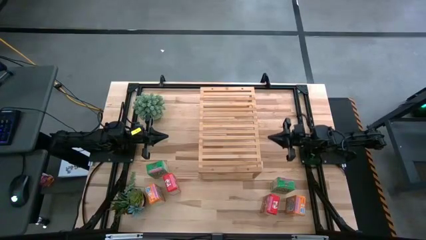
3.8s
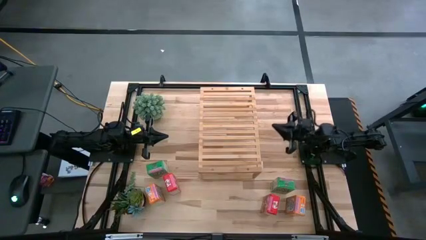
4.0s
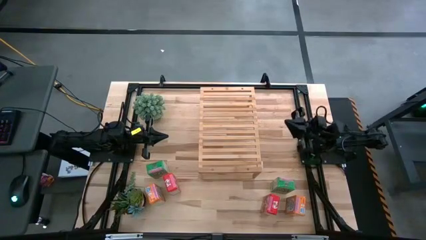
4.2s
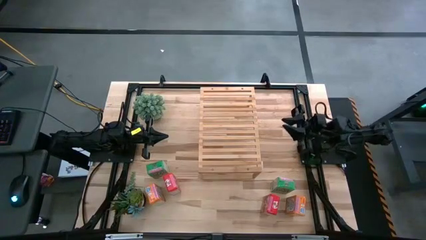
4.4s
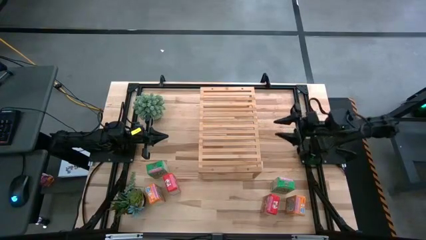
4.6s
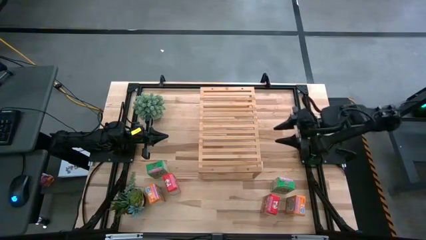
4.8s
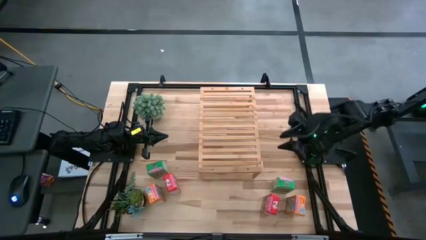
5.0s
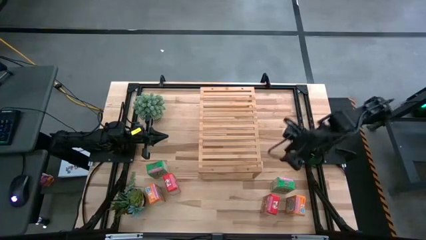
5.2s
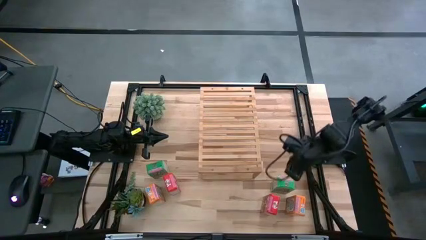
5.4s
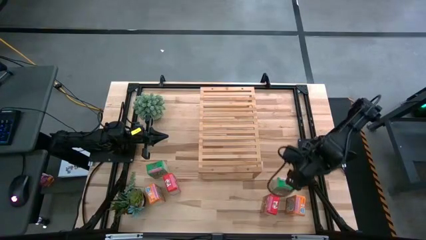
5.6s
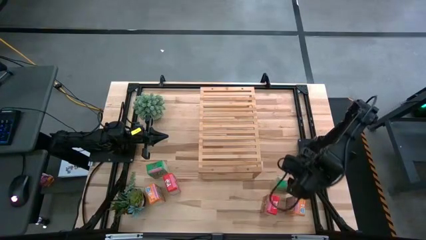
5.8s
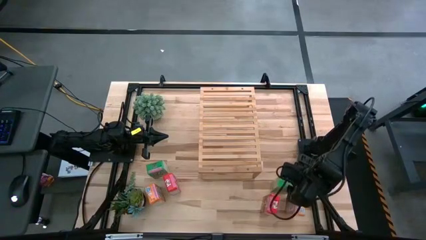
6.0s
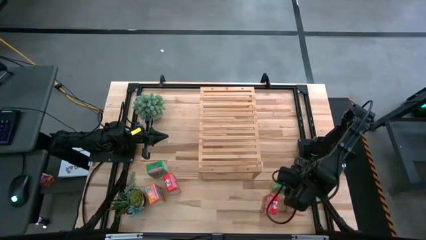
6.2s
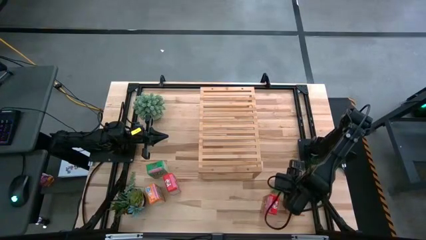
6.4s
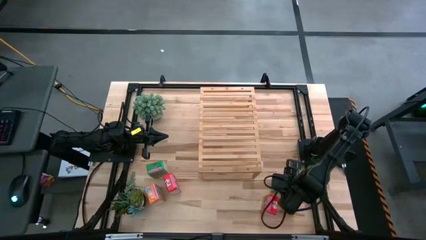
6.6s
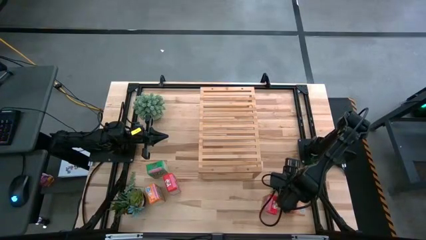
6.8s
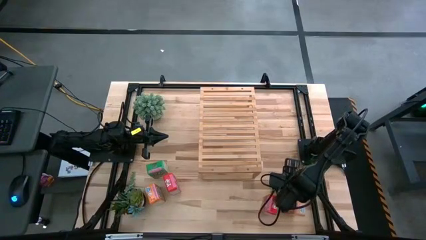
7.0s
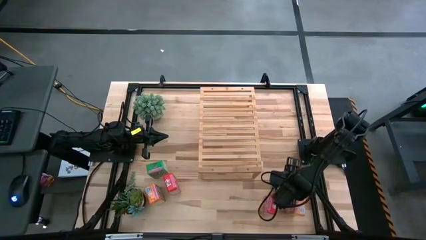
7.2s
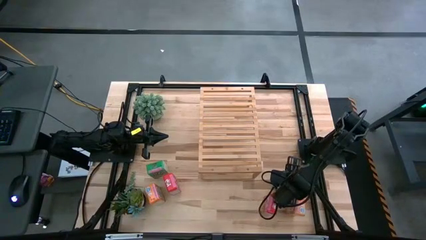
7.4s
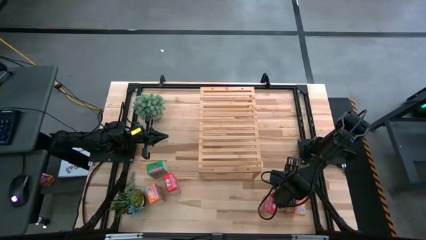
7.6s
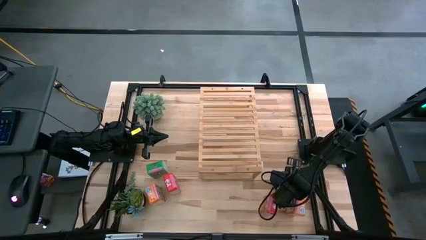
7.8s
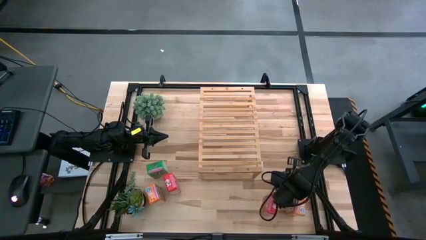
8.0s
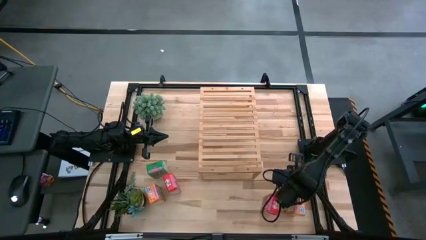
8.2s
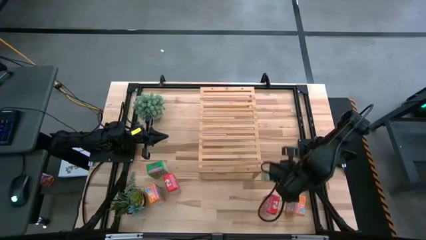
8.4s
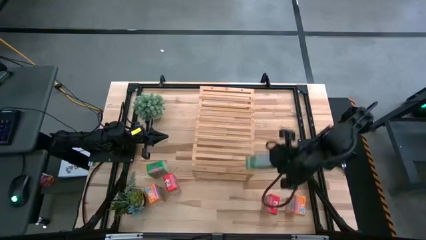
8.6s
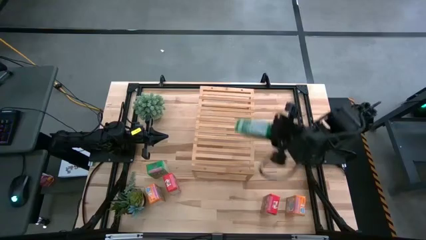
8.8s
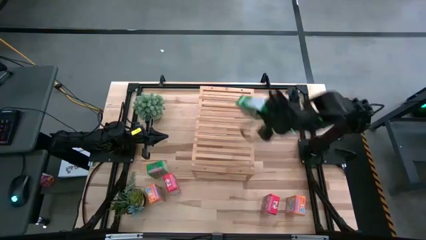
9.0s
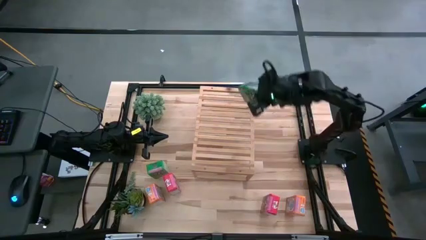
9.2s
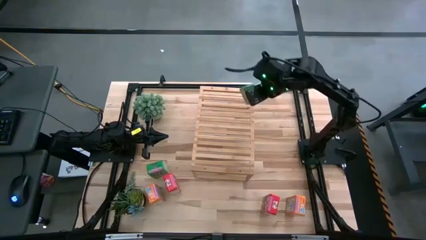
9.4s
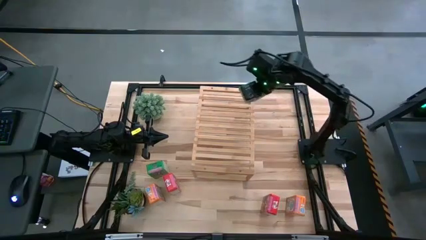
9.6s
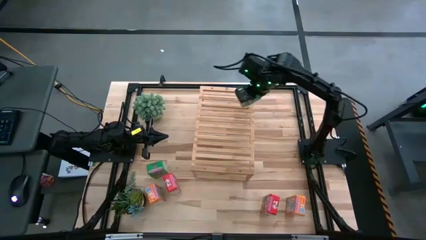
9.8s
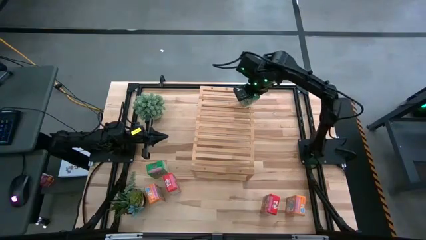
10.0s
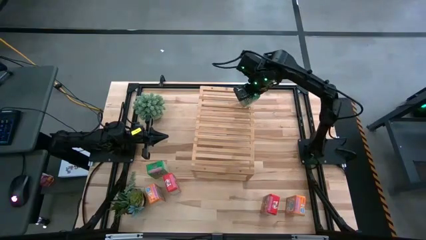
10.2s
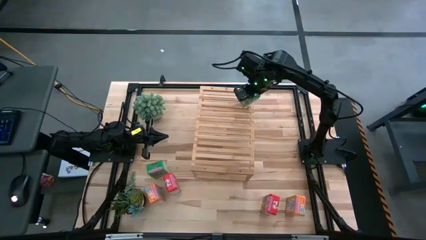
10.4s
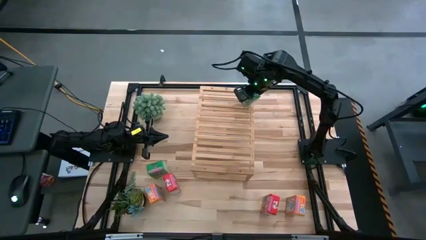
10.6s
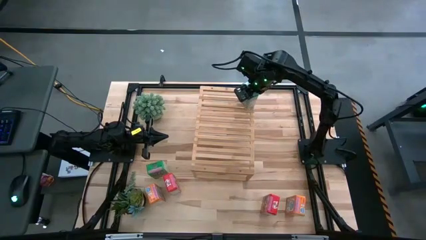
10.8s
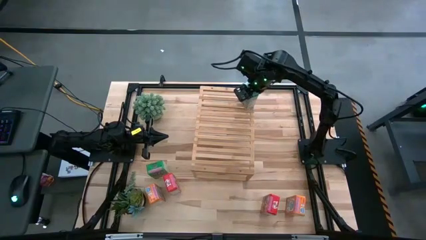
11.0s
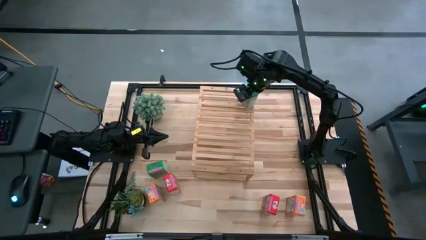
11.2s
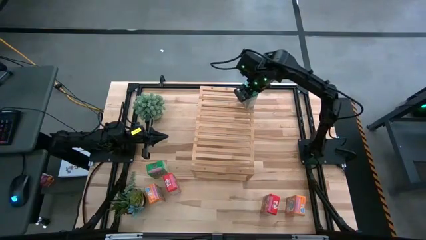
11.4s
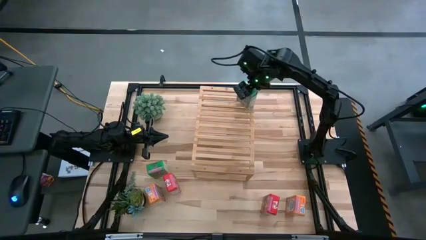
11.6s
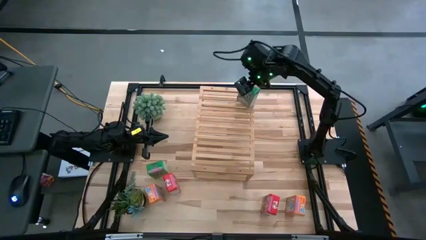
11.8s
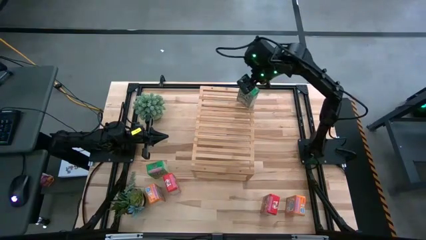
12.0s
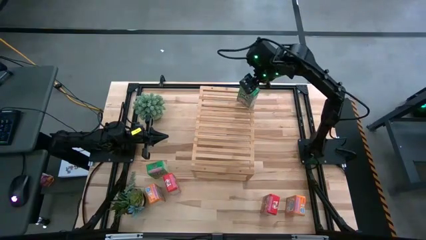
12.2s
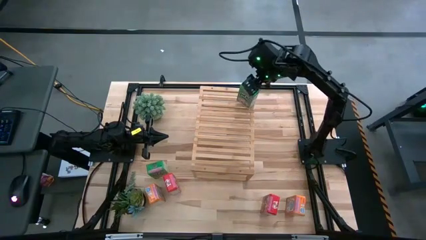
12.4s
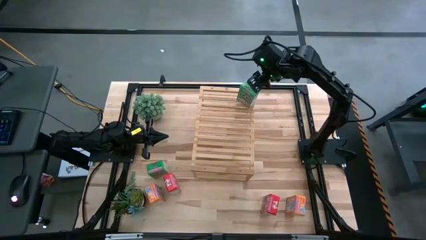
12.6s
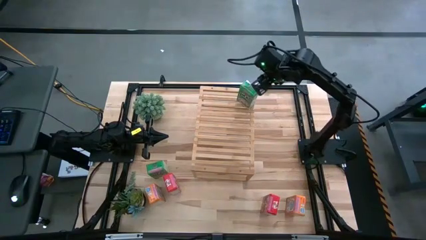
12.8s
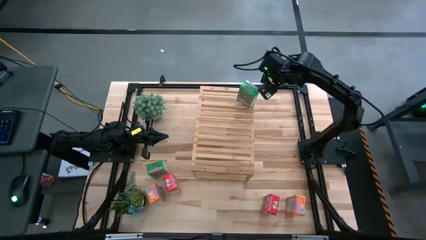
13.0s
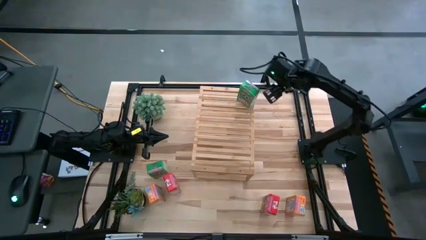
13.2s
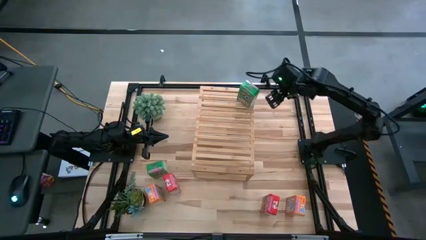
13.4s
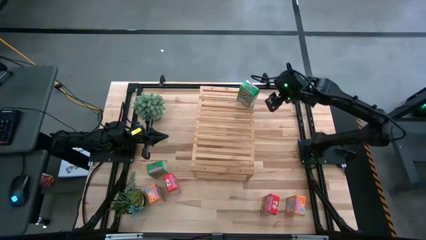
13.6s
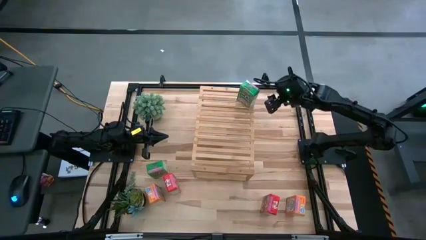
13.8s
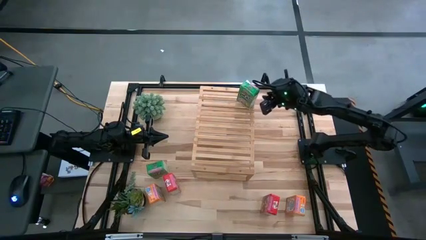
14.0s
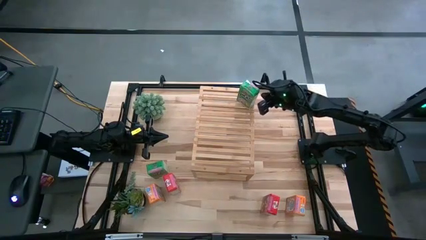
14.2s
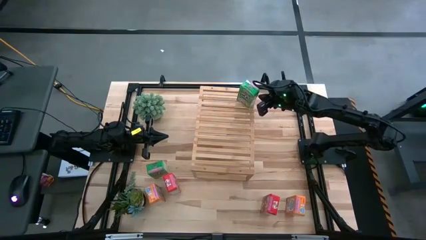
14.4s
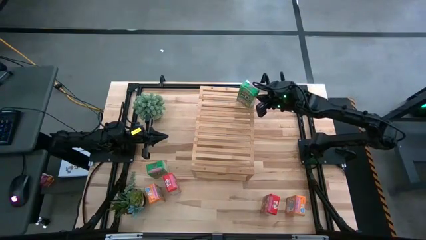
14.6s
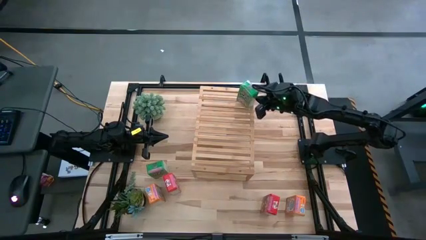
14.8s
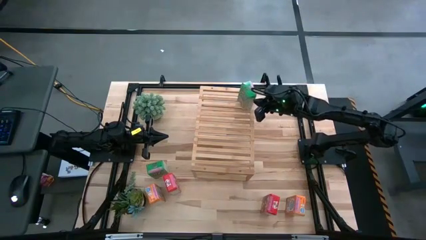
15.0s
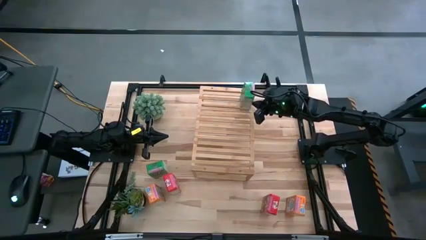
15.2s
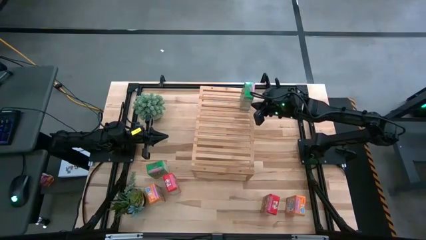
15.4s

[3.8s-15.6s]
Task: Stack cereal on shelf
Put the right green box cereal on the shelf

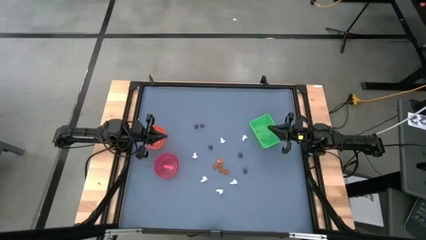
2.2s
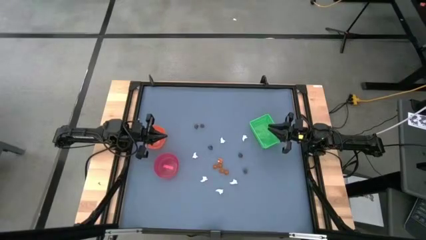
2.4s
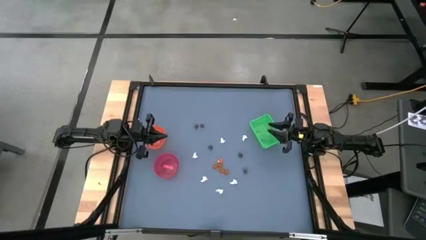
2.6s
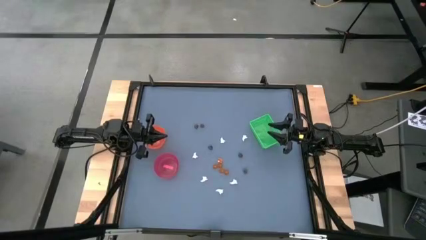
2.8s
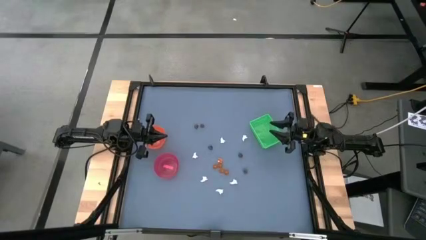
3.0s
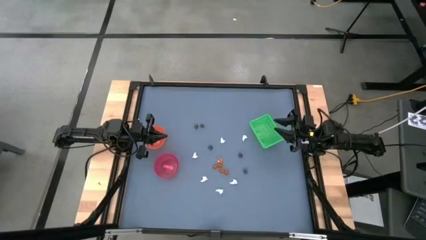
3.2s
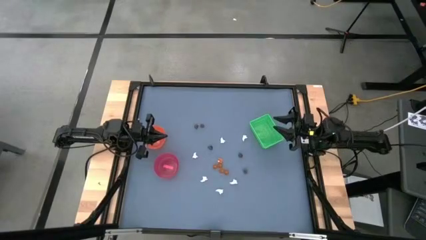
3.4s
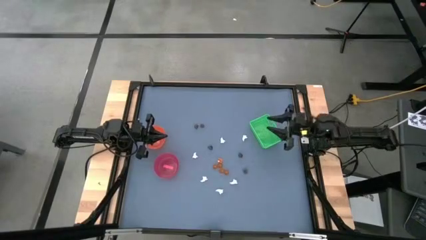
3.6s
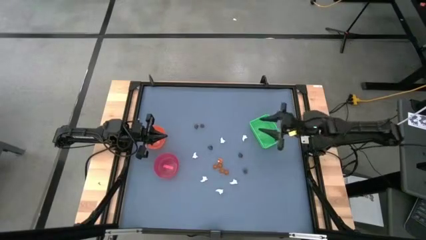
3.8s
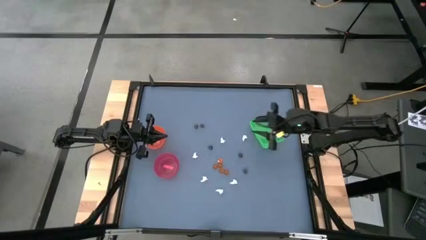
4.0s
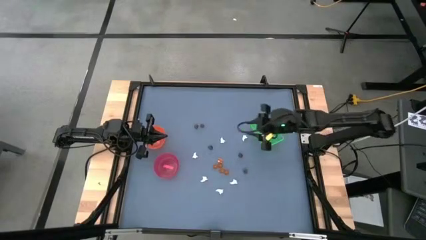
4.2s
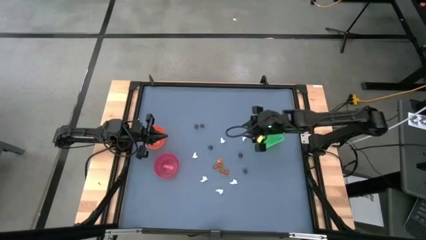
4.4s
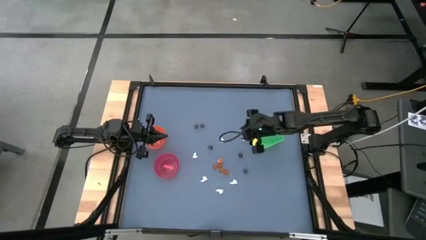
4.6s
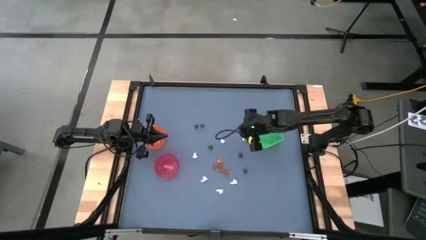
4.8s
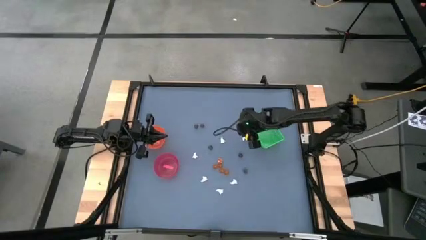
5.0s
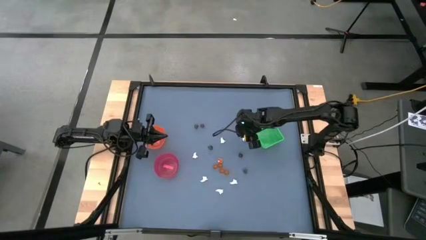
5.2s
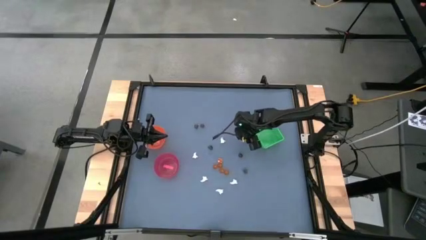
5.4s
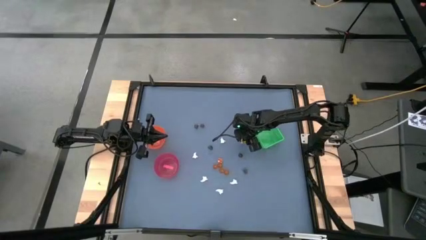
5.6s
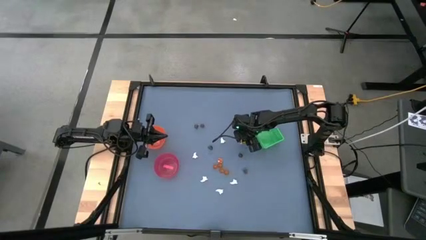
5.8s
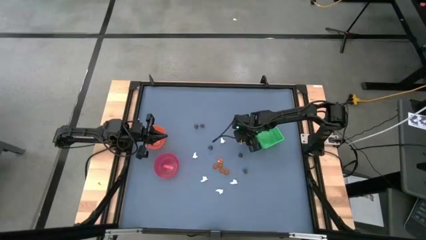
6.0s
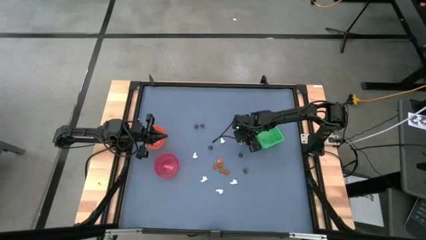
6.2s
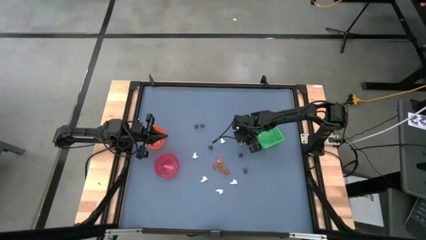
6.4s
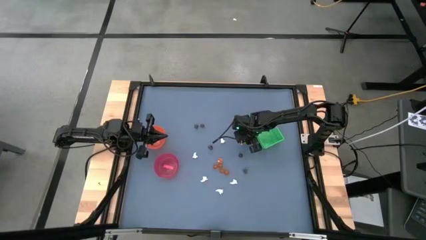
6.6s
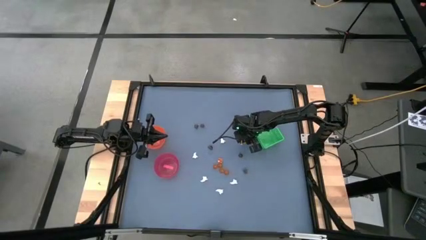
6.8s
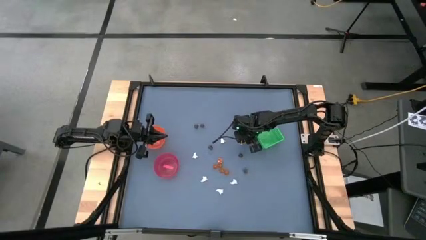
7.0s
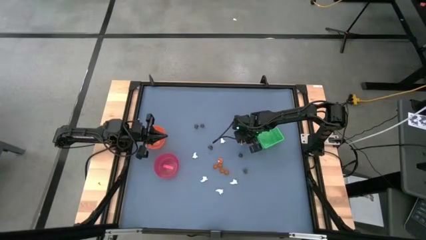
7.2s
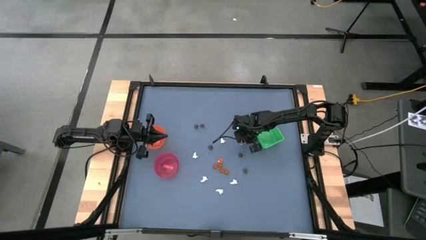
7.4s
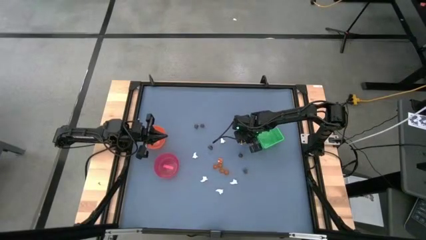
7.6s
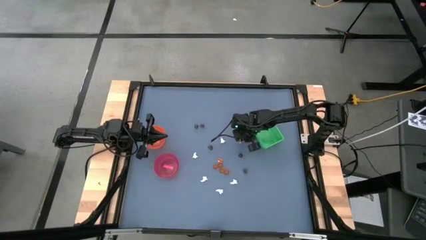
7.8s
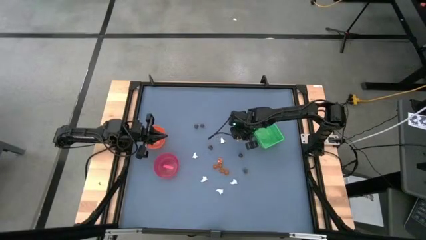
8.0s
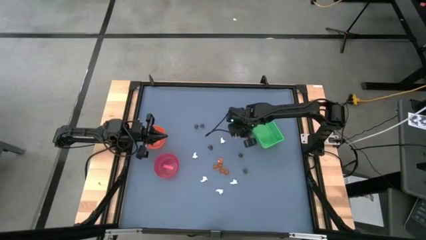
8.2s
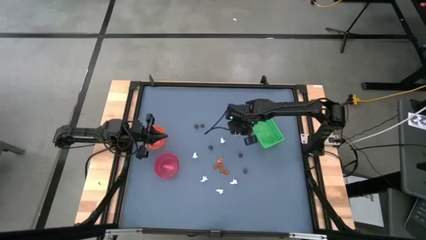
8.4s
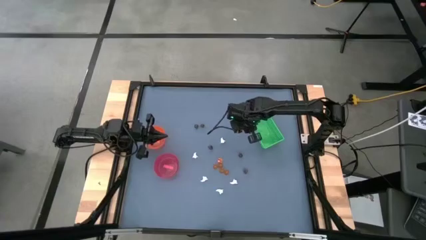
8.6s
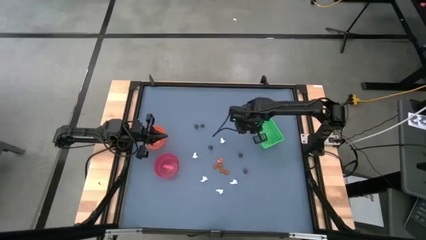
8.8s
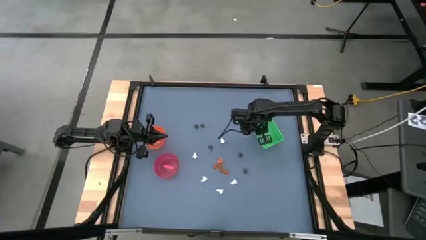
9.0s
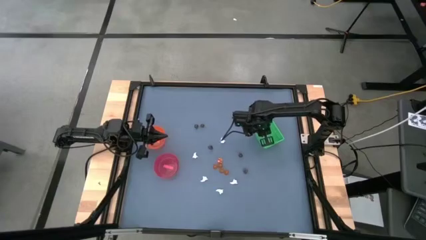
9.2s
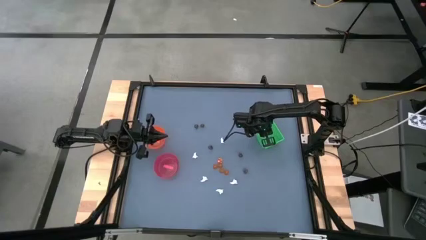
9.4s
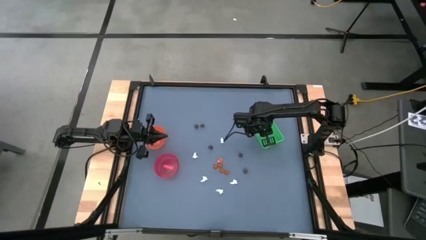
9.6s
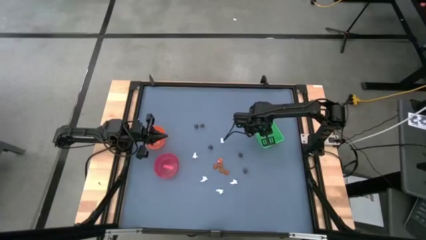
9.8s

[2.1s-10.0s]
Task: Sort Halloween decoration
Put the white ghost toy into the green bin
